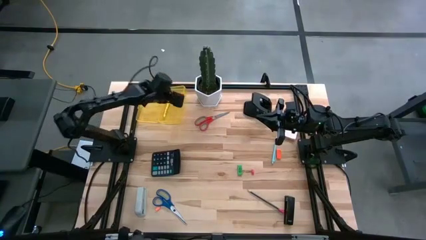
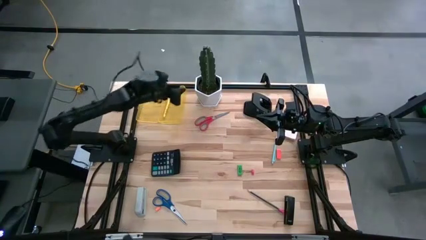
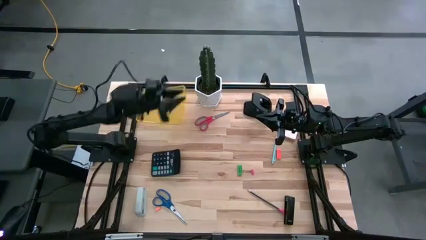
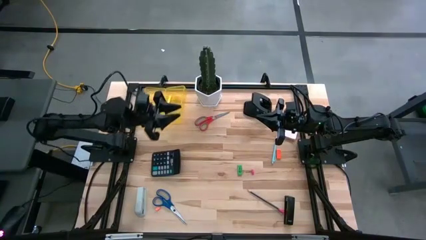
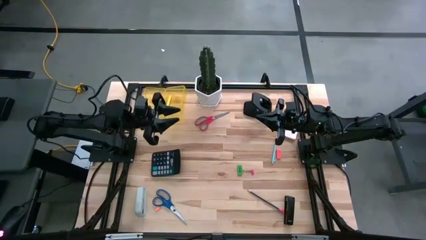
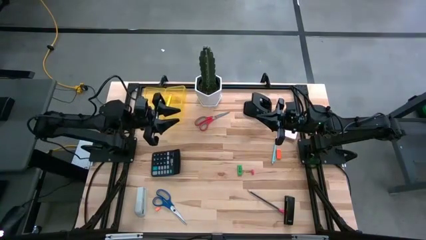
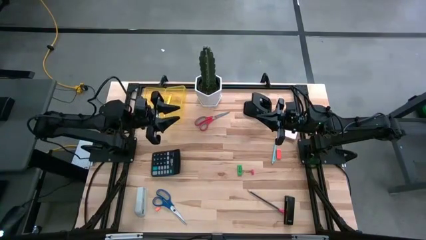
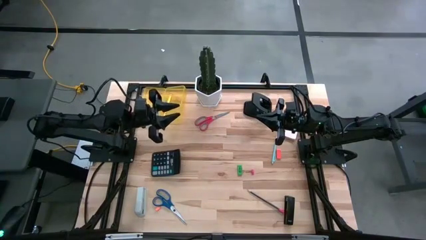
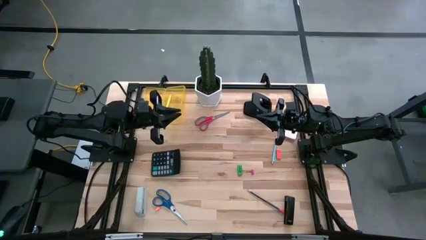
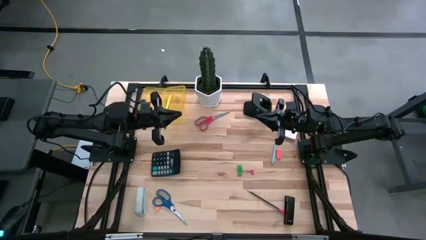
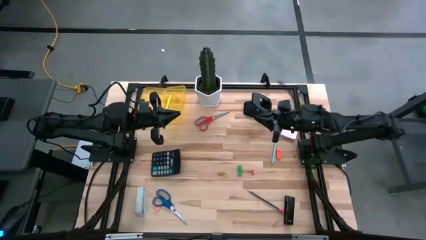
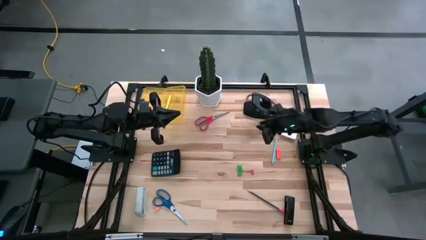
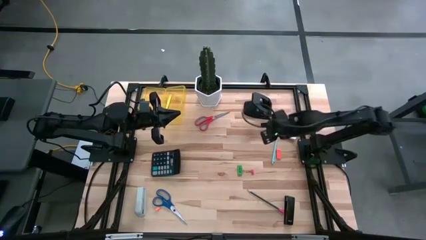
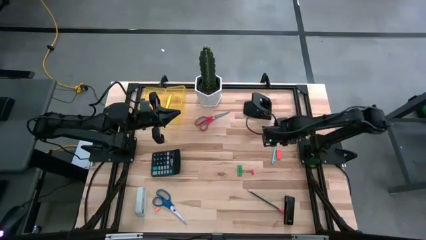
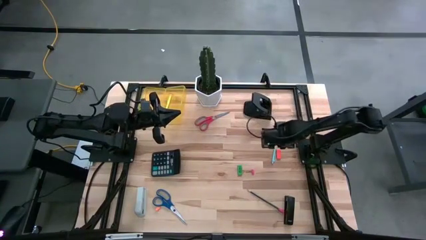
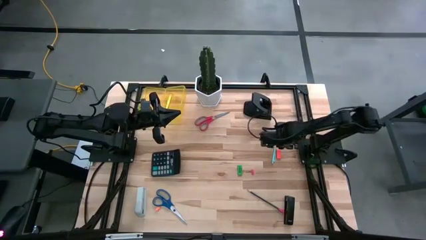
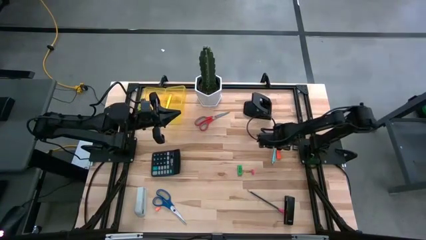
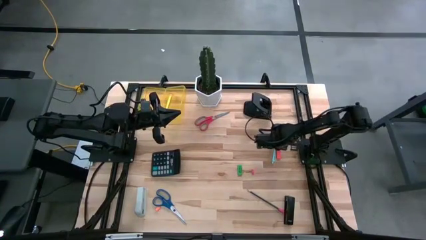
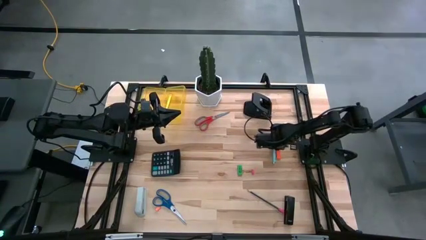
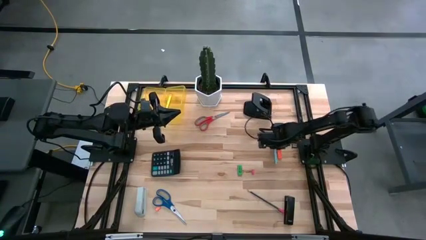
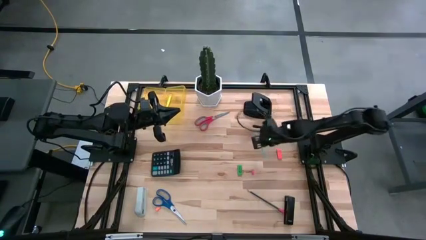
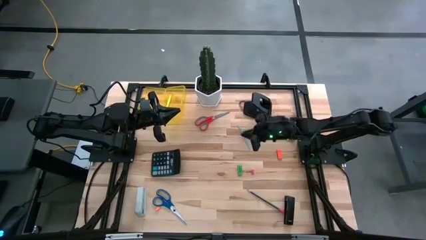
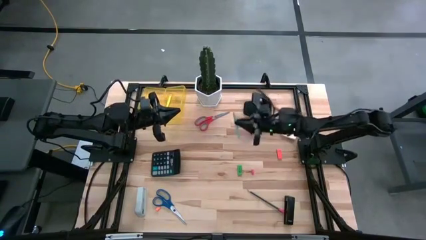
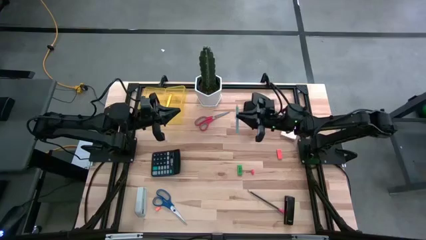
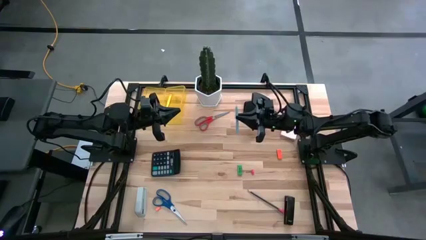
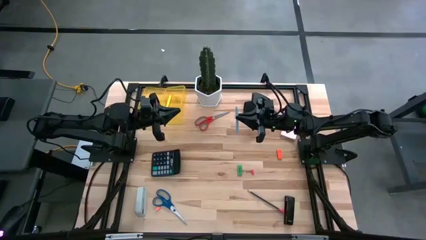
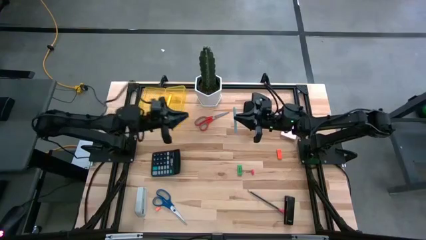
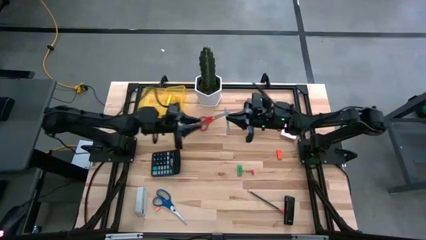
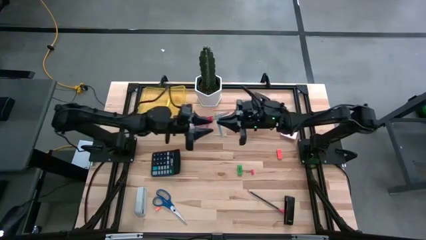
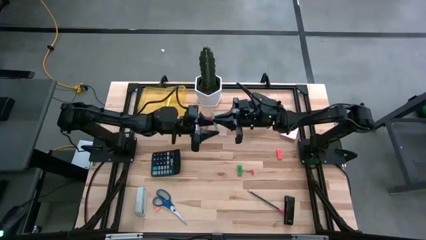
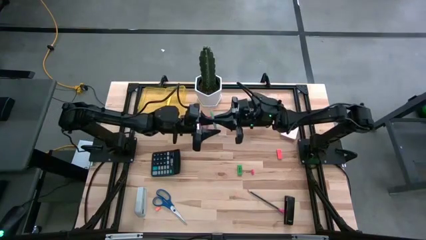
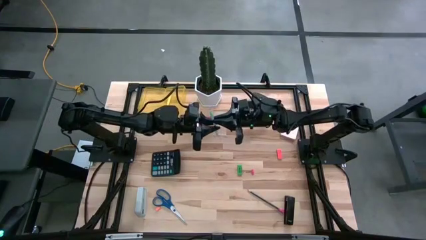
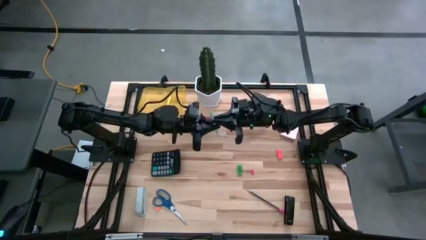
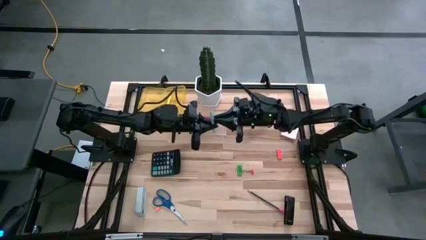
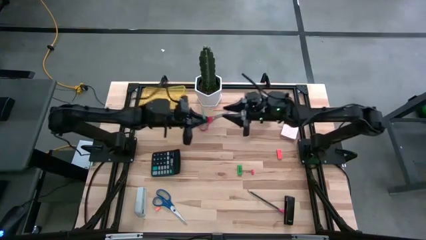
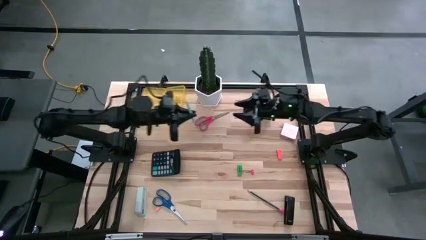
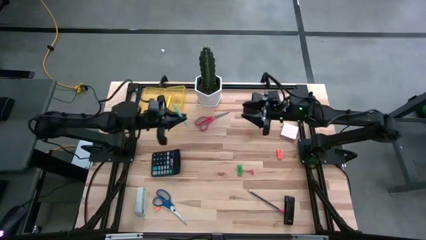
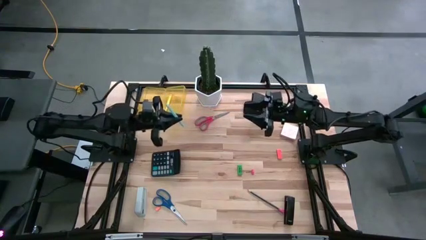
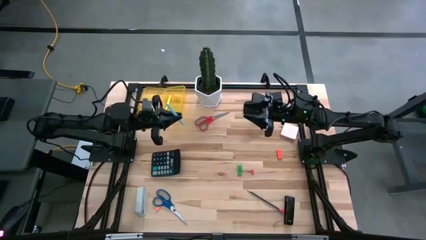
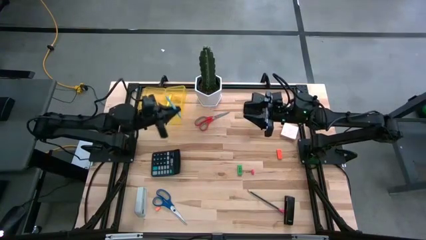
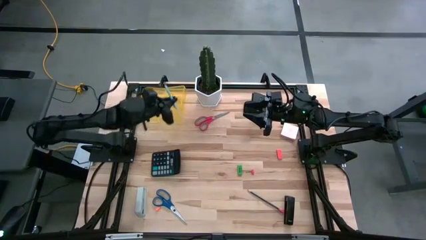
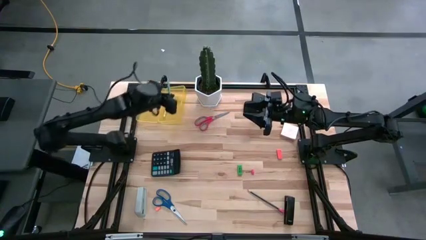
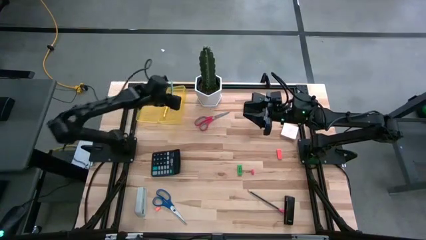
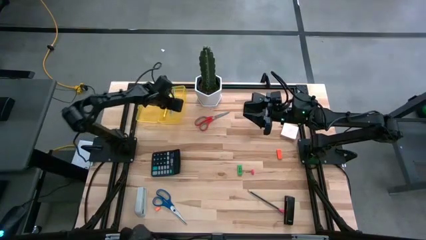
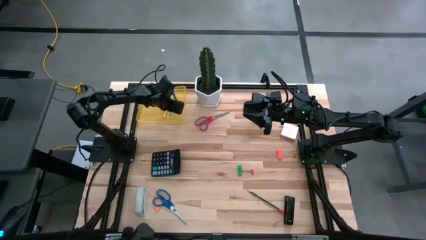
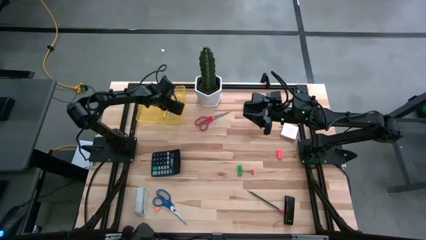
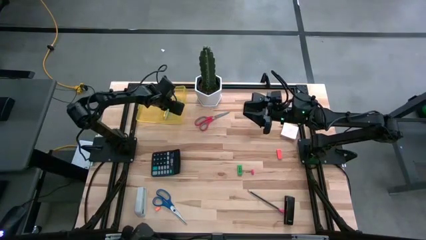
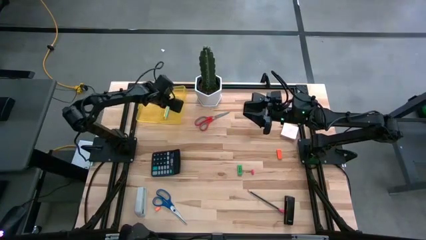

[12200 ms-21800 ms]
Task: Pack school essentials
Put the blue pen into the transparent yellow supply box

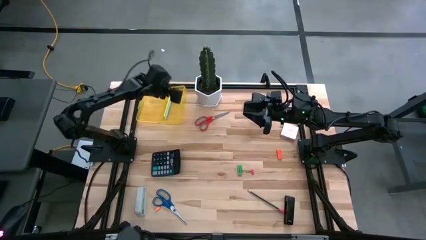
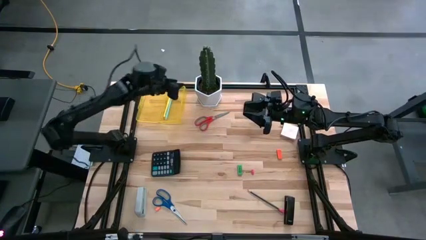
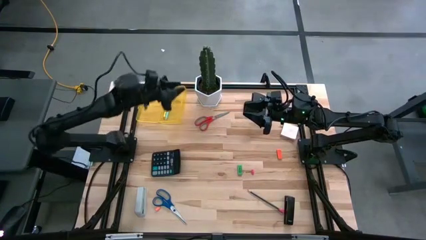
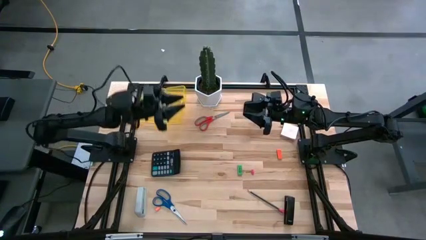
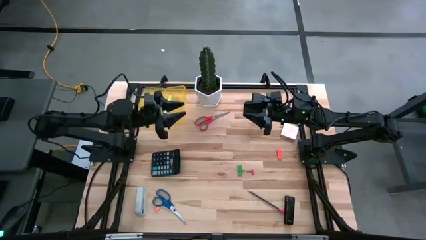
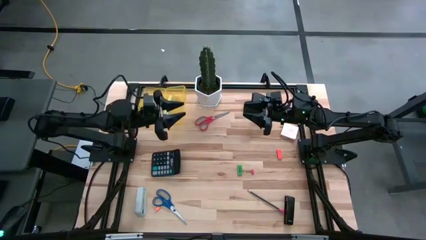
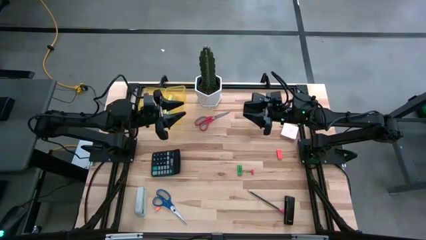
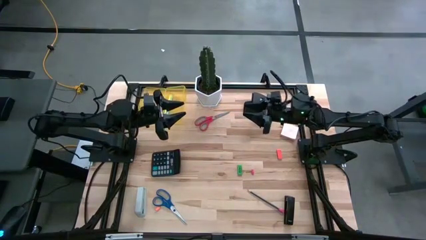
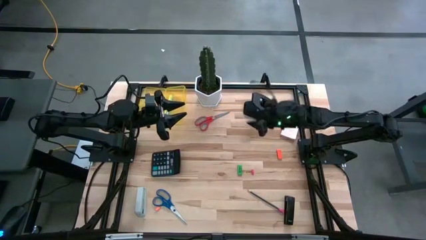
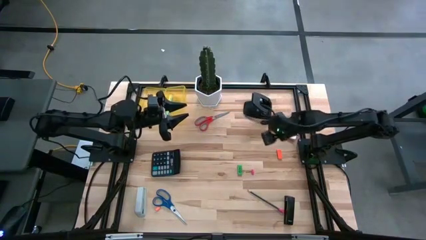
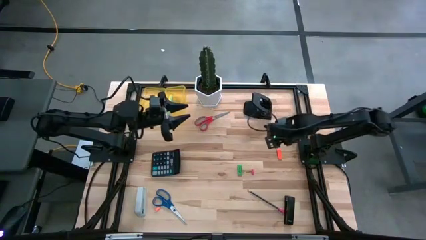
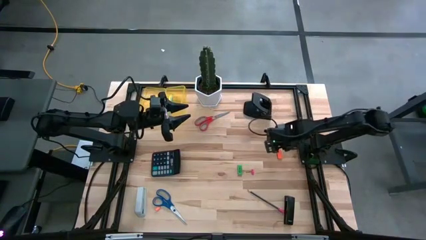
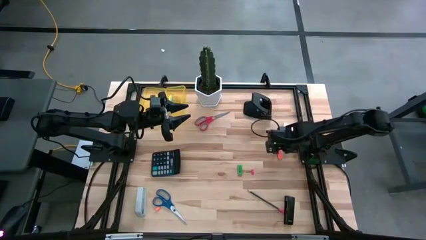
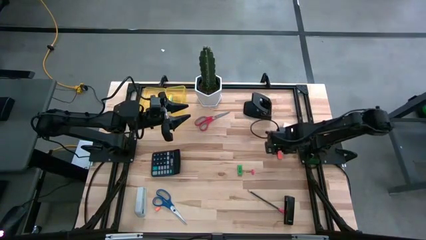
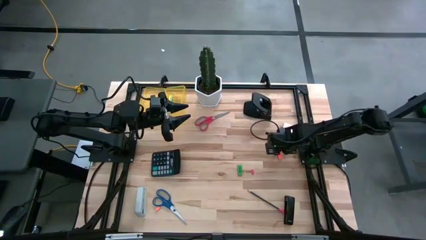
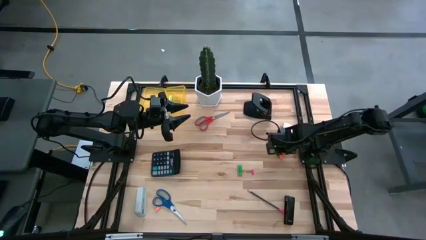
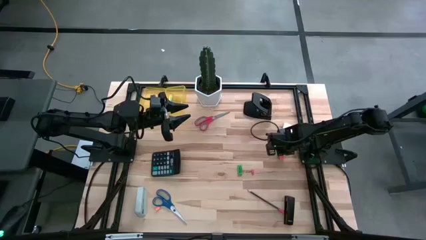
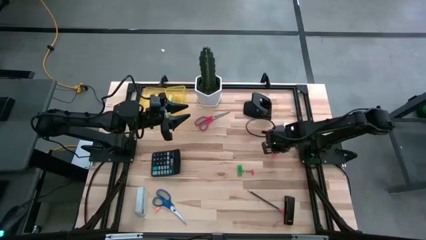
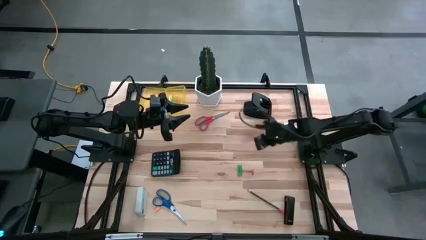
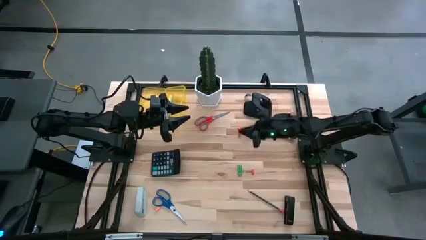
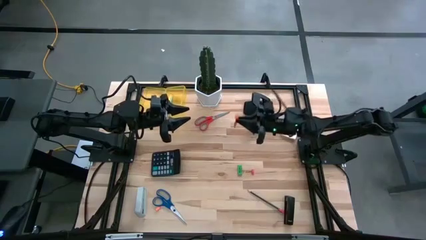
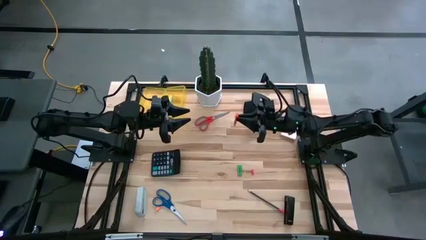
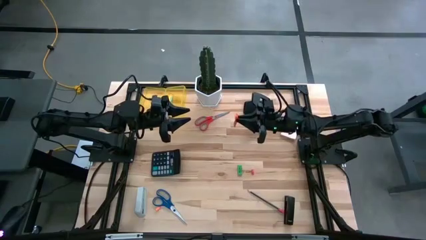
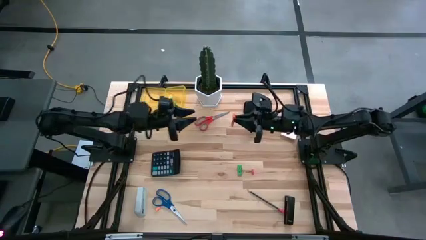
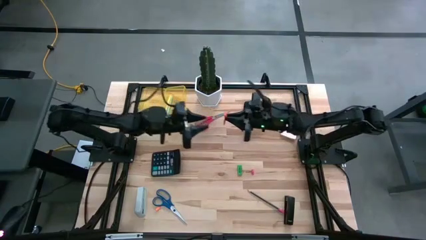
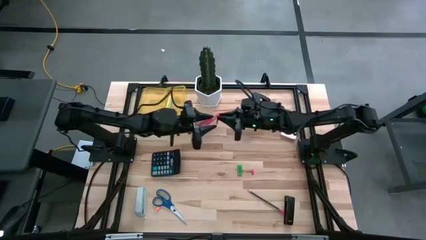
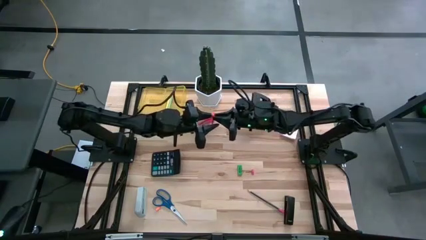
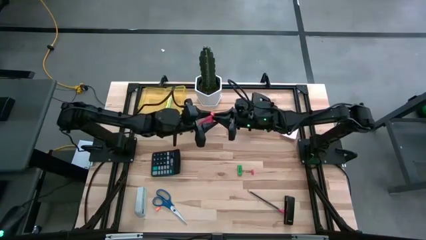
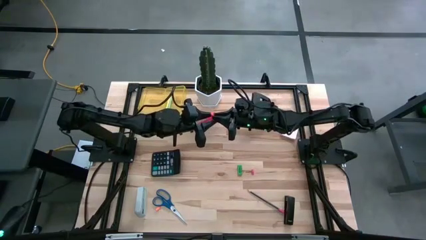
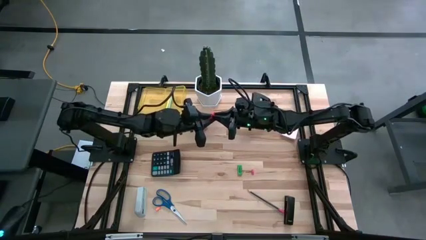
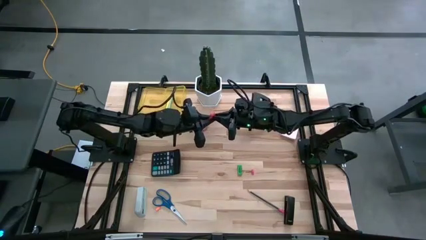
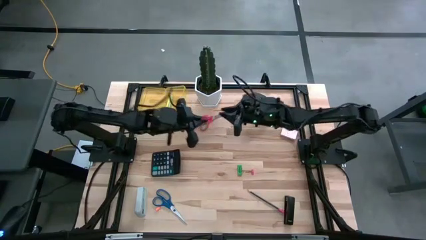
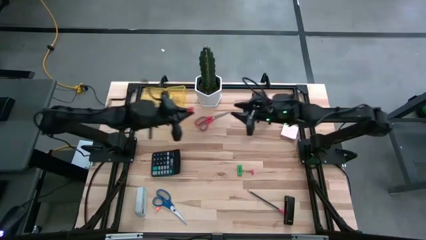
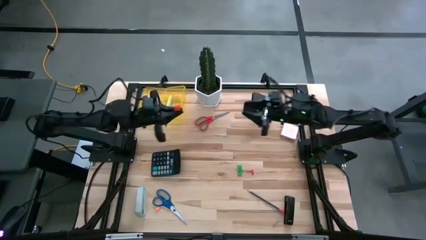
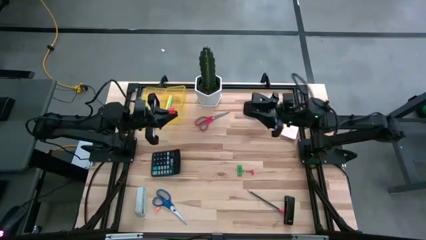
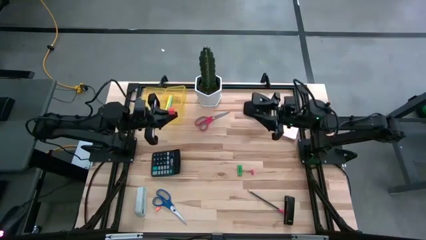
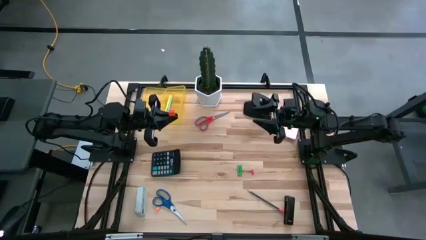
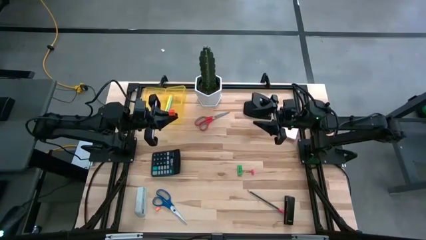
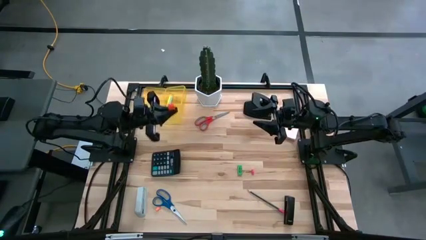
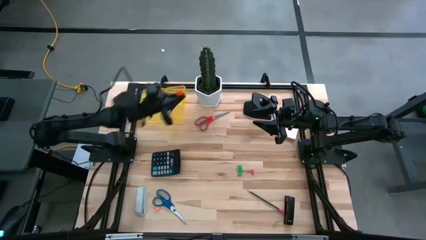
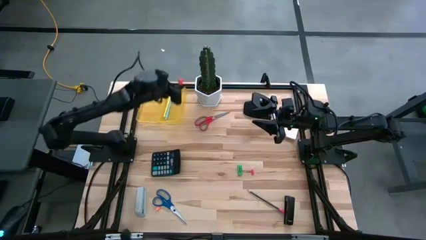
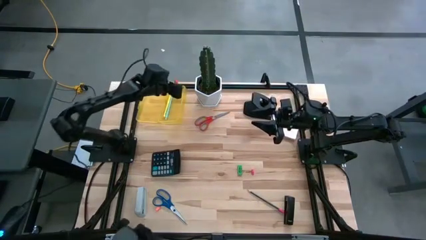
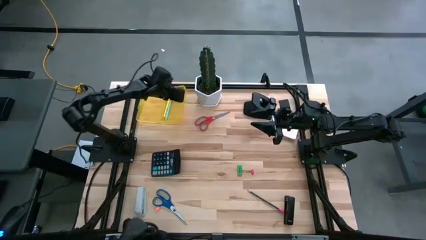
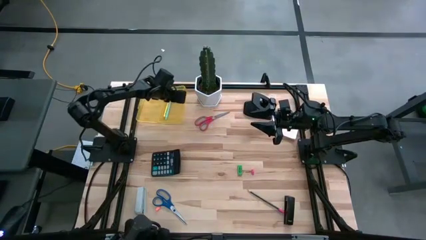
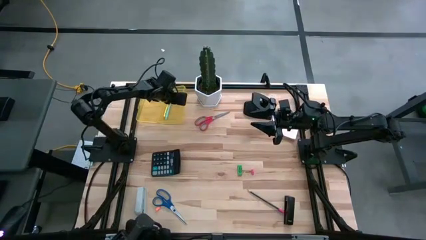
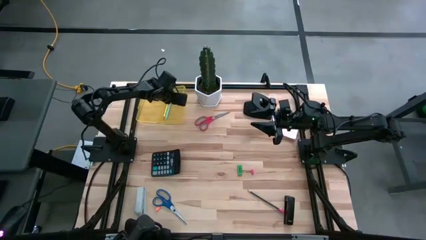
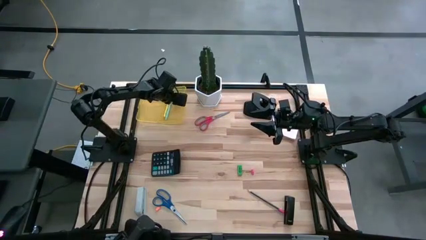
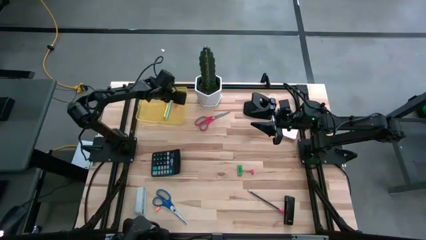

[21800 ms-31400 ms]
Put the orange eraser into the transparent yellow supply box
